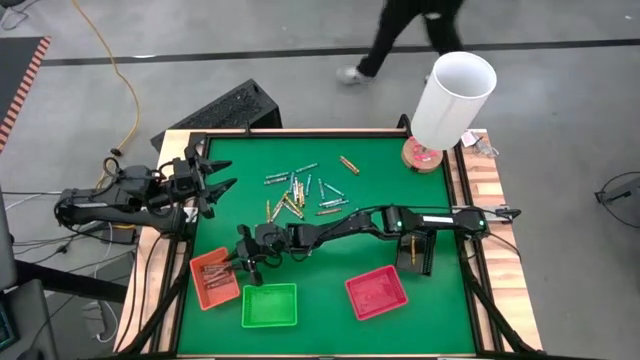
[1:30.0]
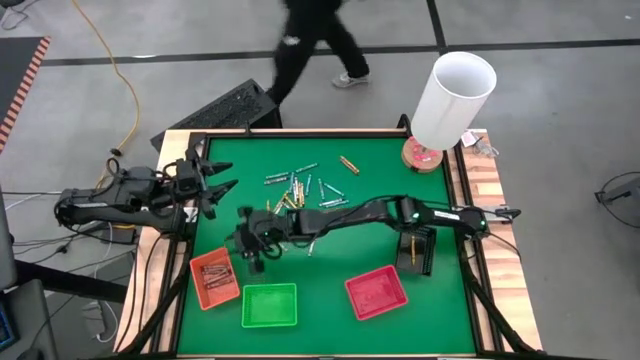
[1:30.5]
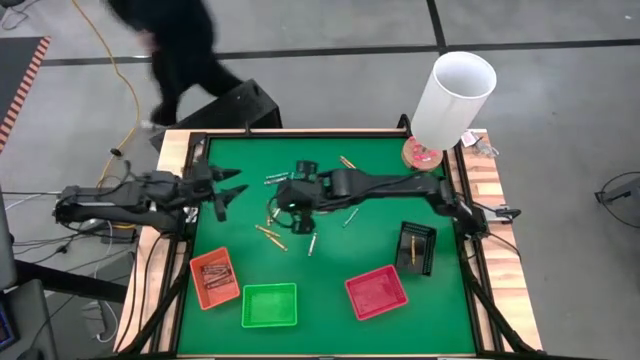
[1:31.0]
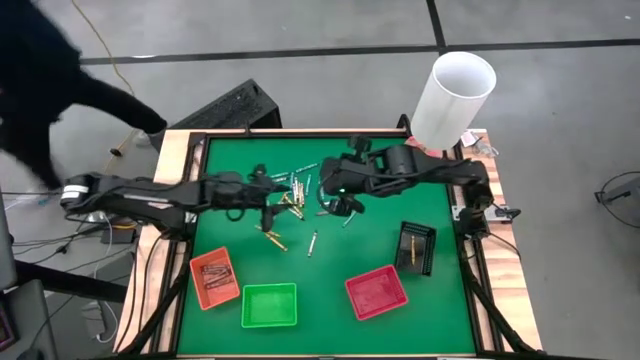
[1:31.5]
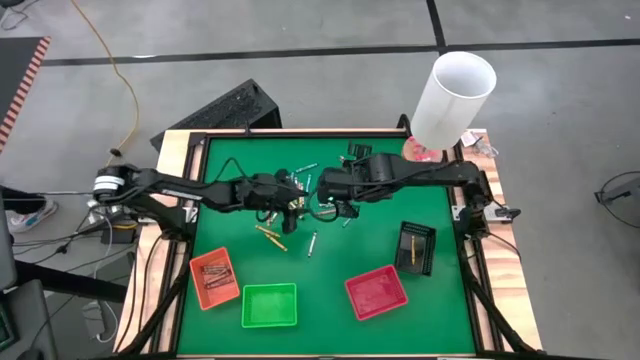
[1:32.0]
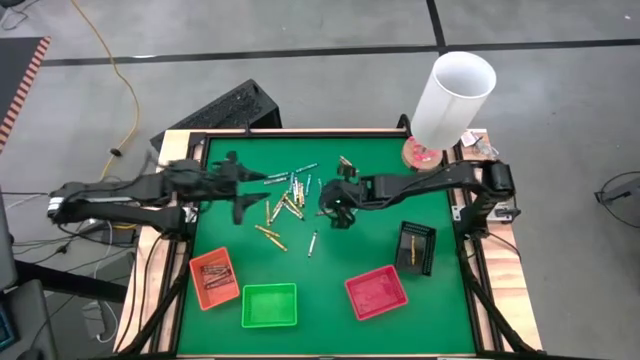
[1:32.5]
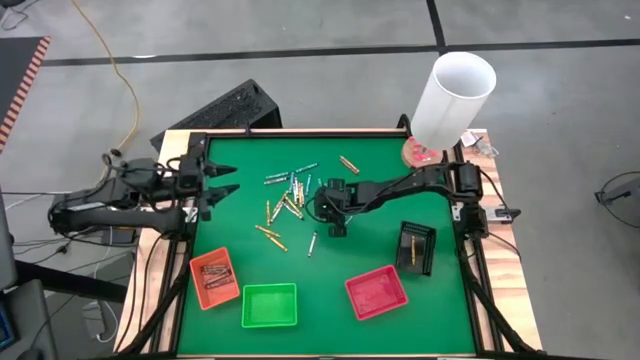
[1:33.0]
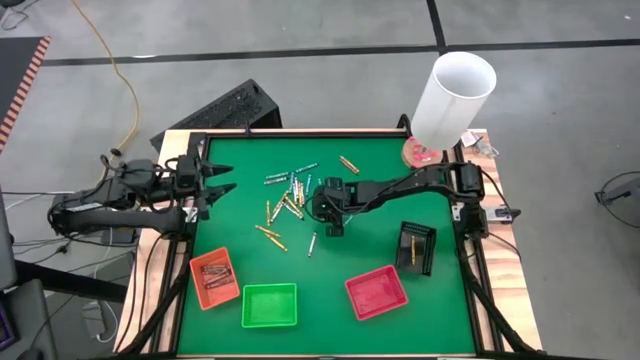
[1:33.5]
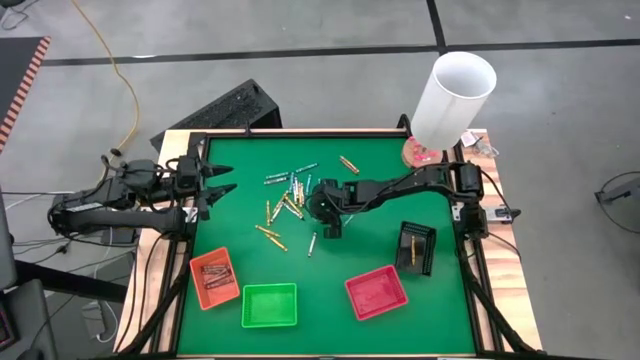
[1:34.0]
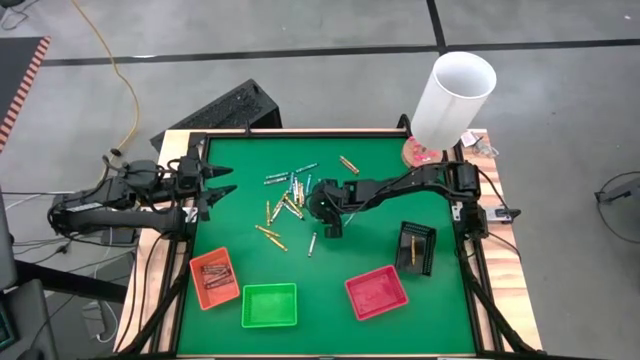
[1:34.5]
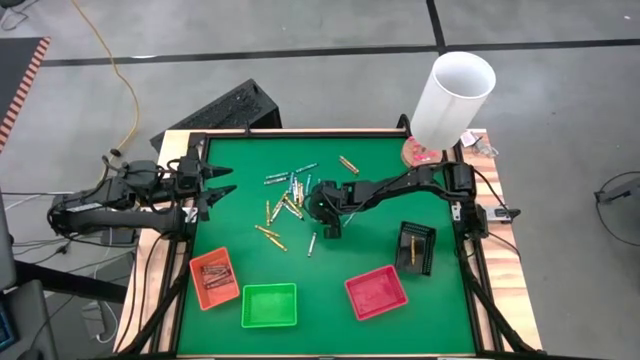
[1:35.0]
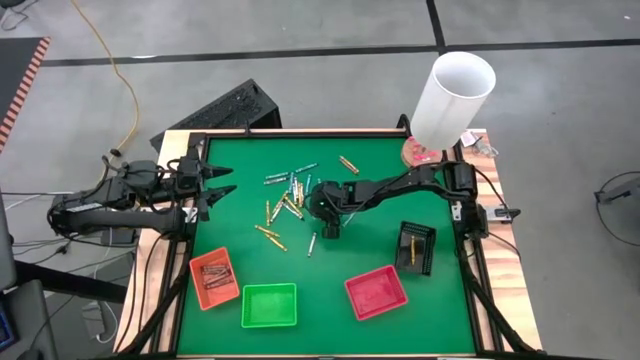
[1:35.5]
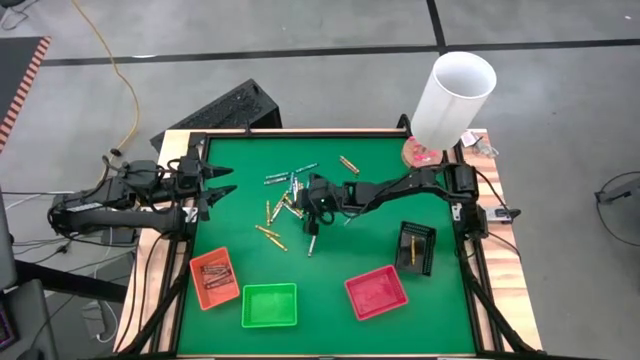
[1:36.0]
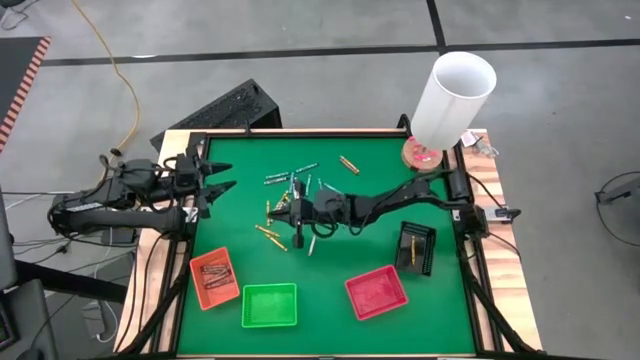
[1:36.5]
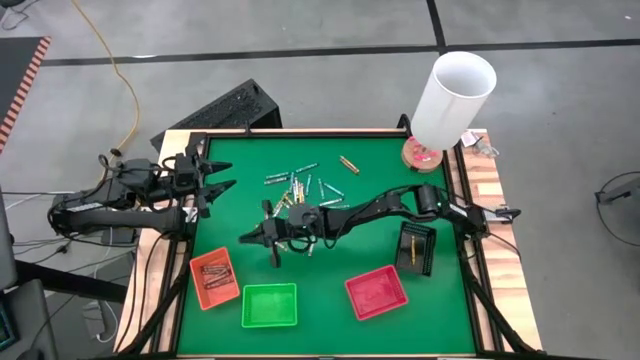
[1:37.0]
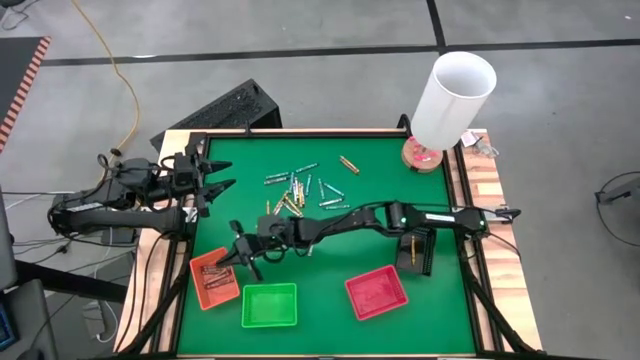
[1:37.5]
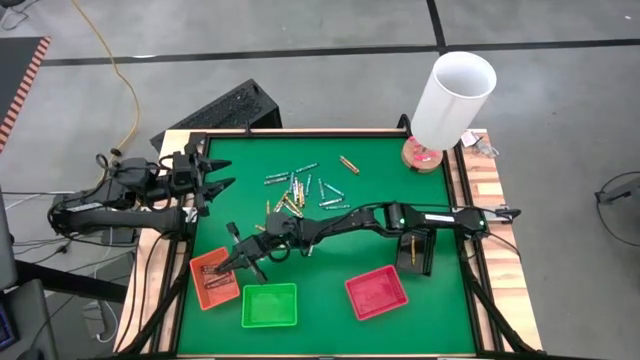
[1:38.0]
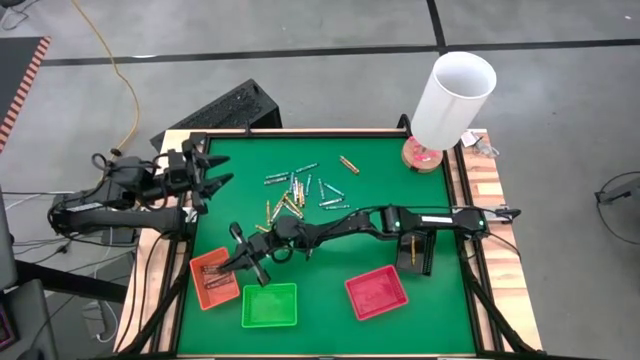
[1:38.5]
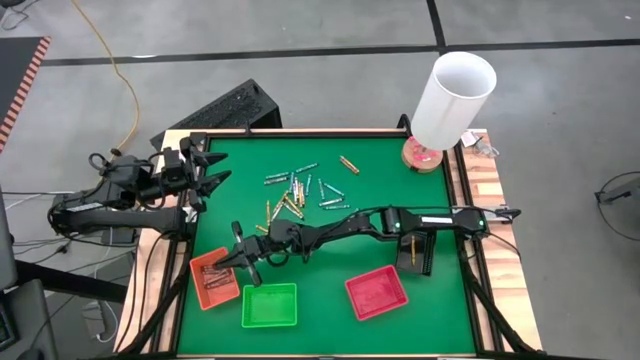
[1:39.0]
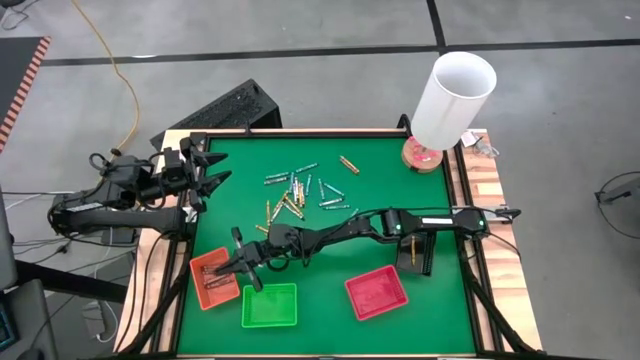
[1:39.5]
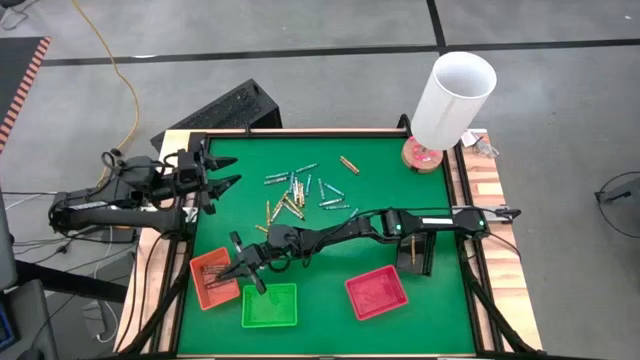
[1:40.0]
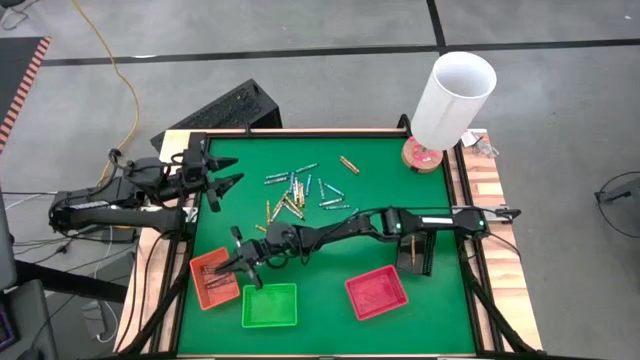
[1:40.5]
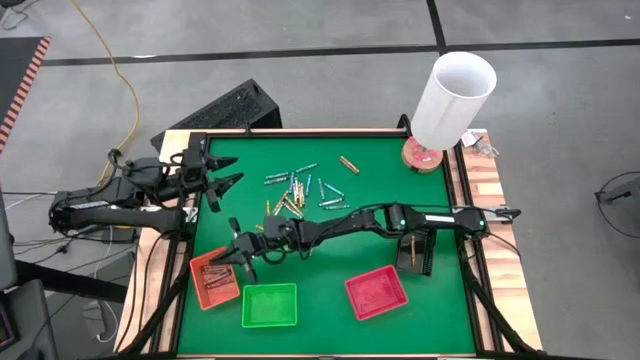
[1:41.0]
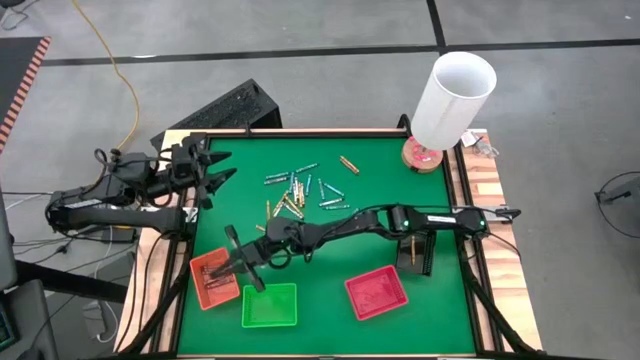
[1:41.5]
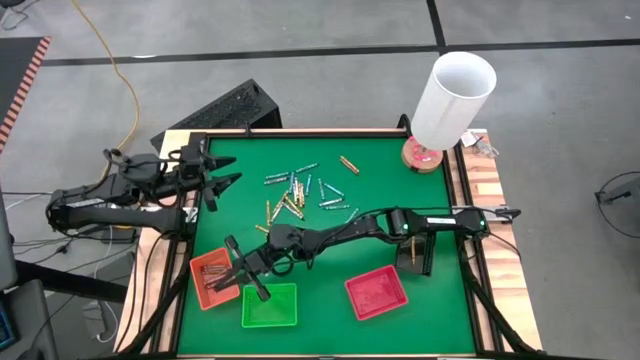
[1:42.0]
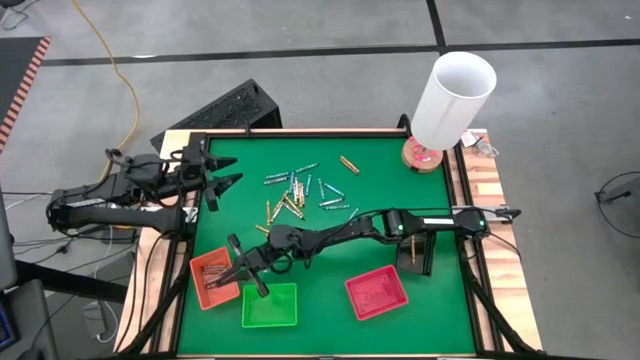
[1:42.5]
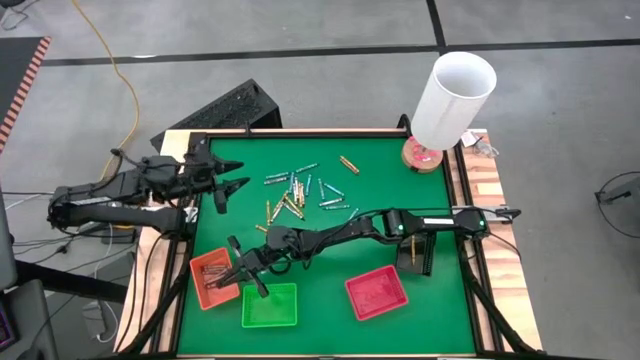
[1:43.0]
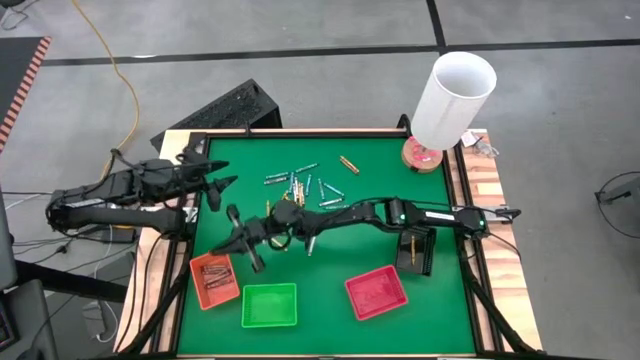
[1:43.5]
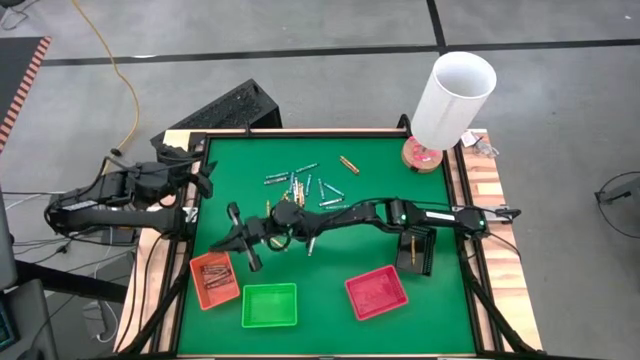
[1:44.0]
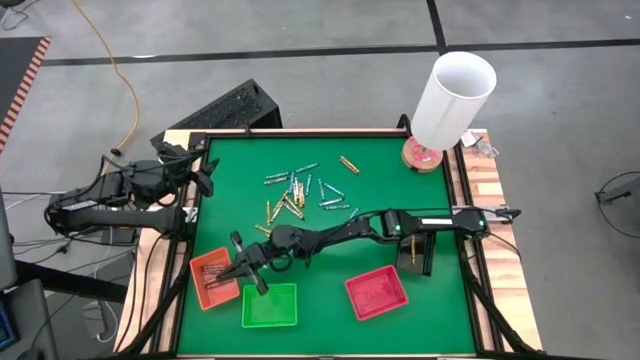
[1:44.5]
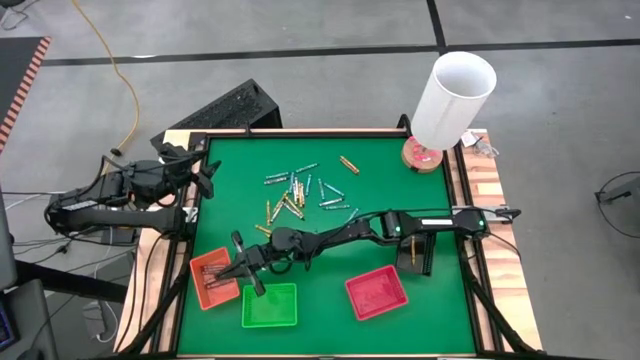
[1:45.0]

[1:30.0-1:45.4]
Task: Sort crayons
Put the brown crayon into the orange bin

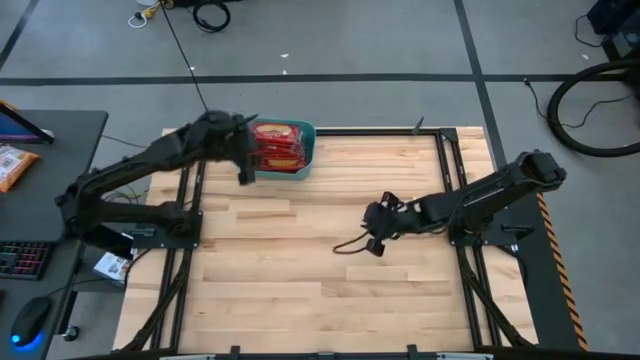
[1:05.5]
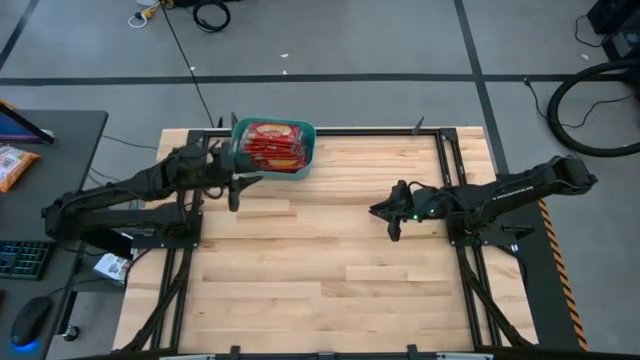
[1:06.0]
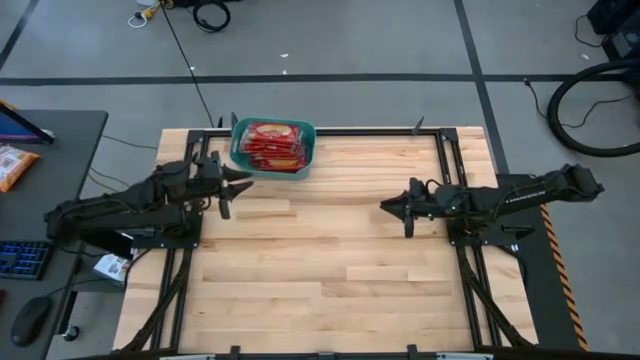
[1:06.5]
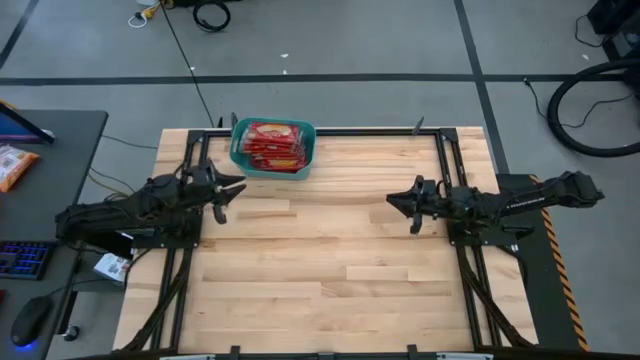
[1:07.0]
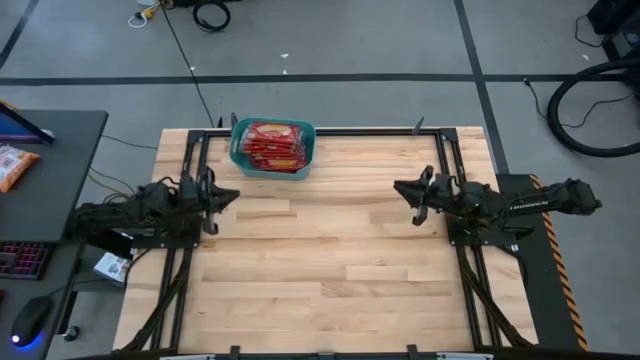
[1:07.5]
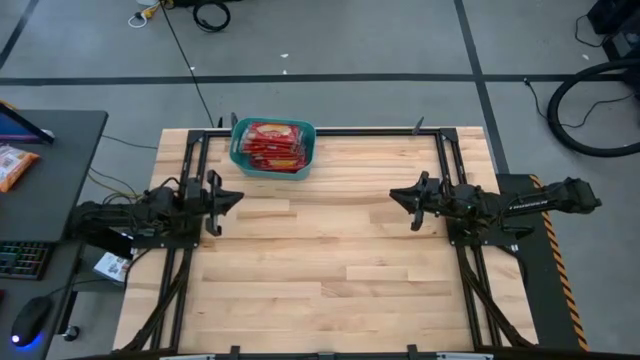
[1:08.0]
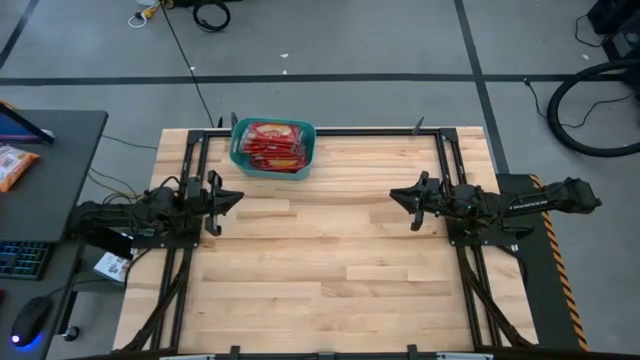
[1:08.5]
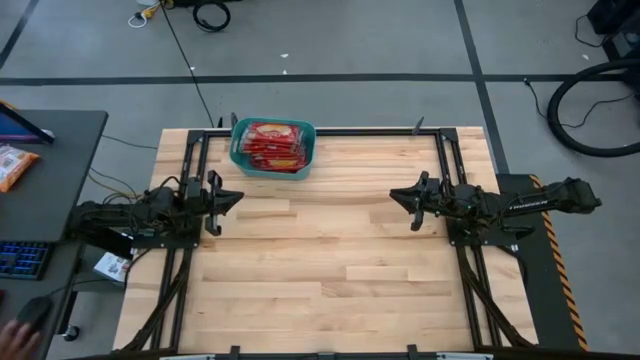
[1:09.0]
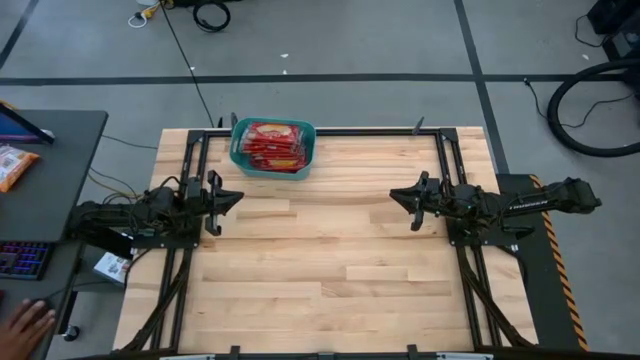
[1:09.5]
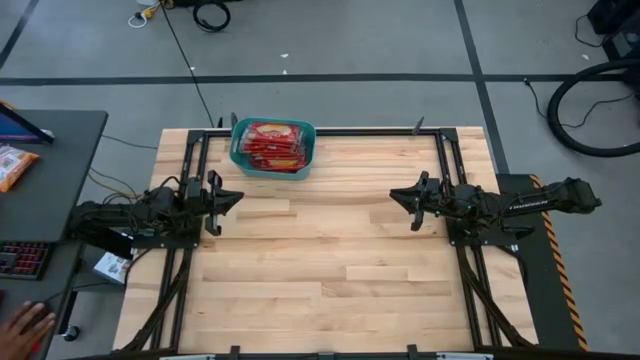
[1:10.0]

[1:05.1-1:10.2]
Task: Sort popcorn bags into baskets
Return to Home Position

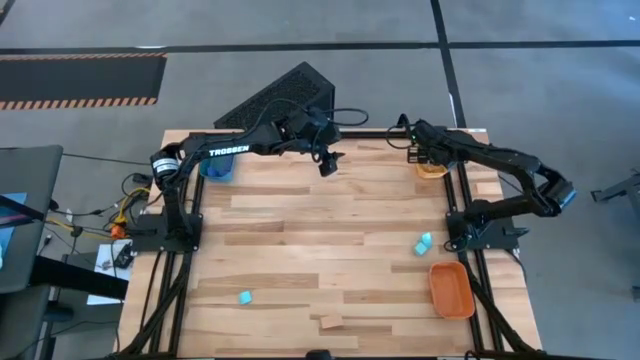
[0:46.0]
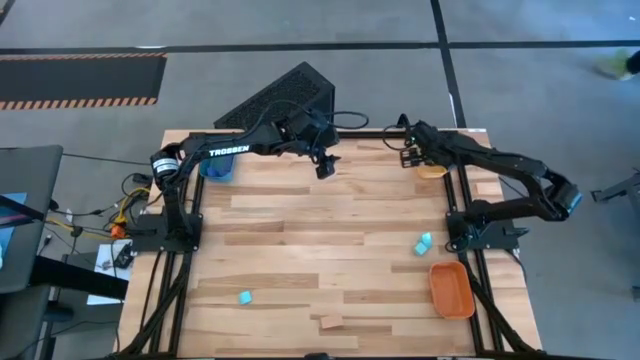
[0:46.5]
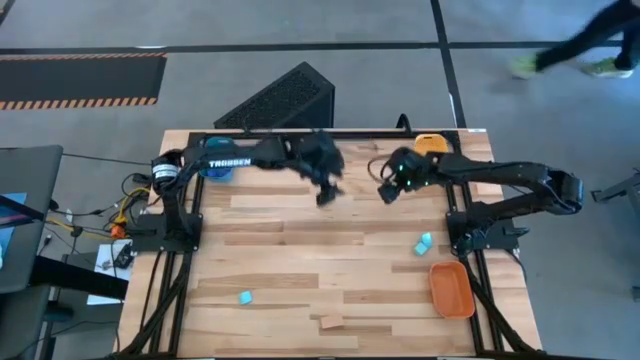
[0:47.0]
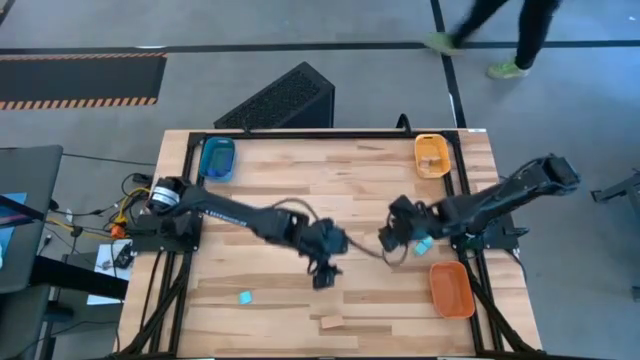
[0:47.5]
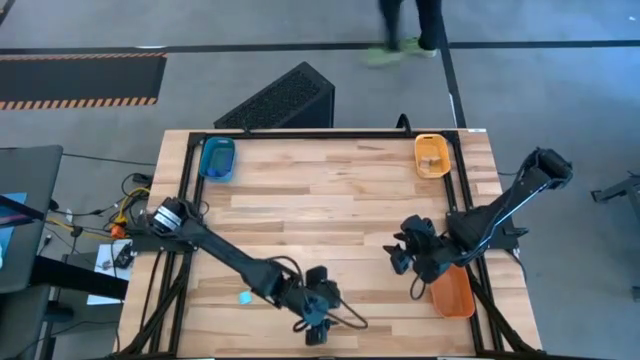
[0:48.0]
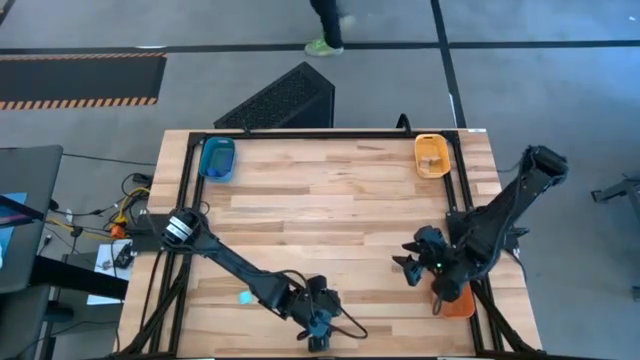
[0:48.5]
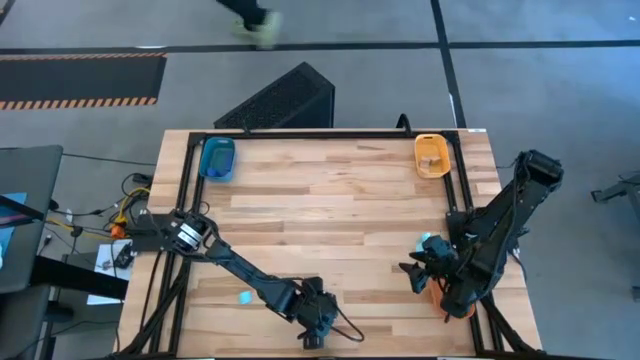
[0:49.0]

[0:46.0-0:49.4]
Task: Sort & place blocks by color
Put the brown block into the yellow bin
